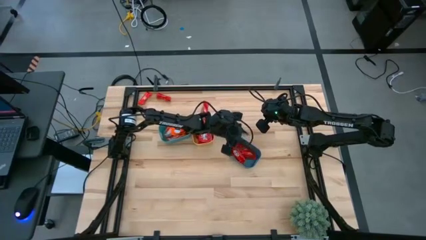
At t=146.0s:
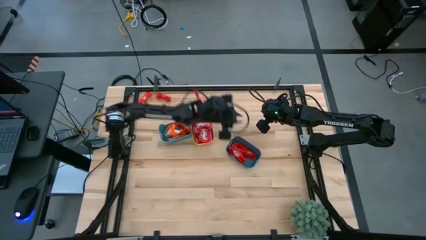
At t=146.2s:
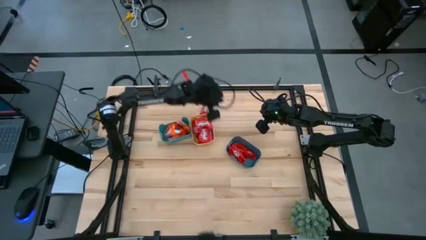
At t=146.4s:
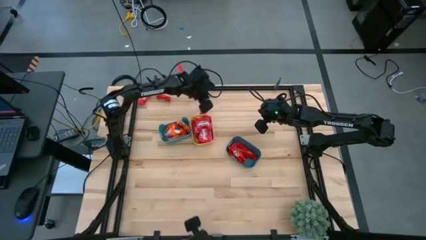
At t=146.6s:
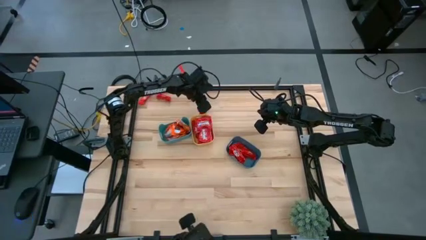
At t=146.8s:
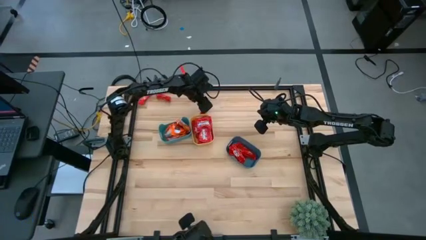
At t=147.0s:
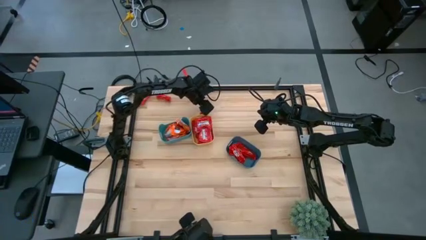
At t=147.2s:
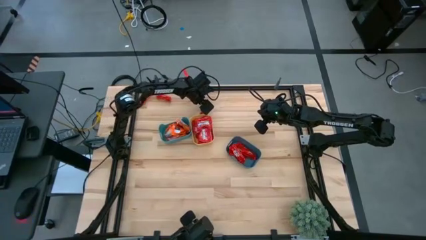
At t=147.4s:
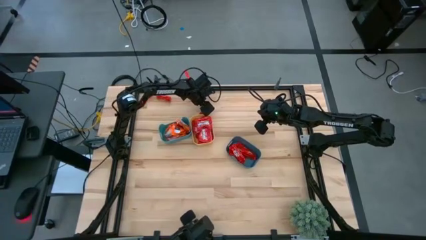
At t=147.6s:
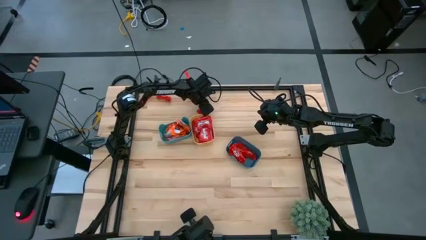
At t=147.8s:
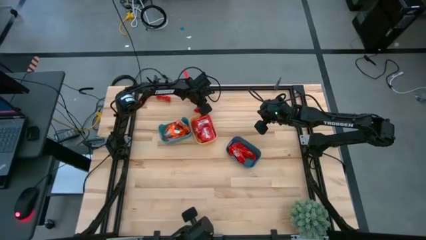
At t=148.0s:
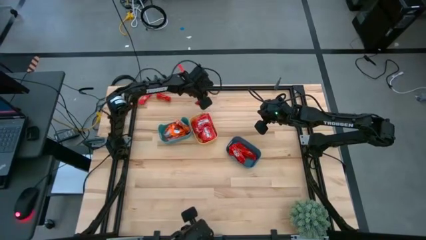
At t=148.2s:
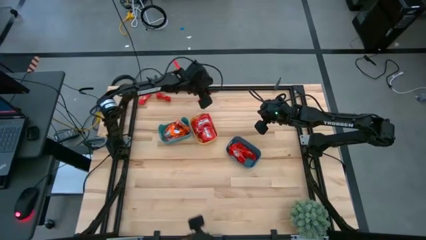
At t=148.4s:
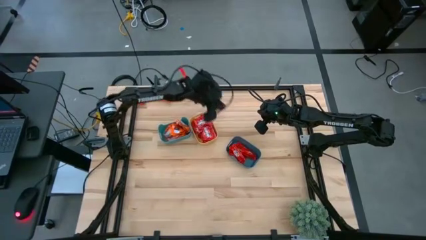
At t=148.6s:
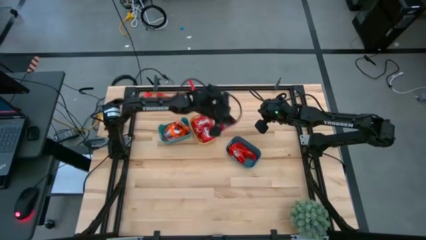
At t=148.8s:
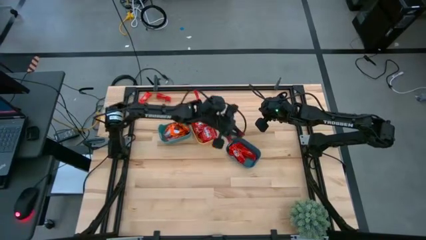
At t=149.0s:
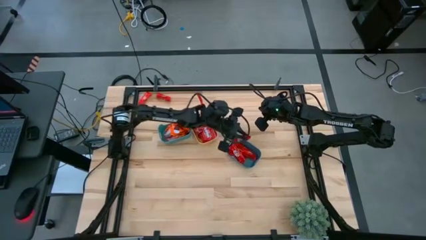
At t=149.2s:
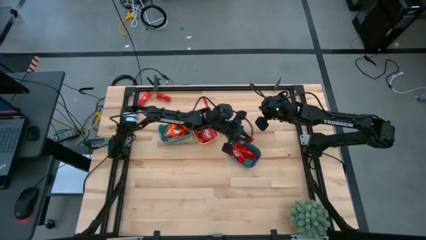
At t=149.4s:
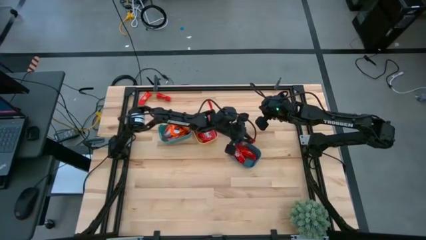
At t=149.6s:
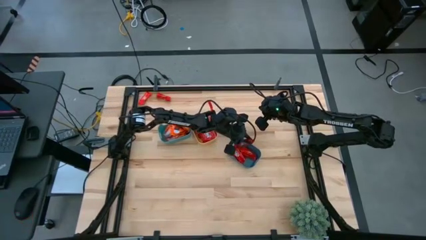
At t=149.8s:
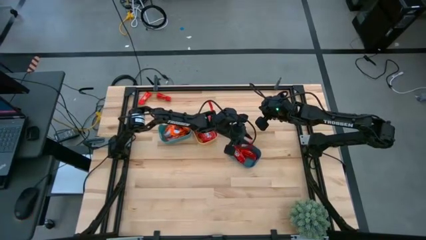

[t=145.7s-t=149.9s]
Task: Sort candy
Put the dark red candy into the blue bin

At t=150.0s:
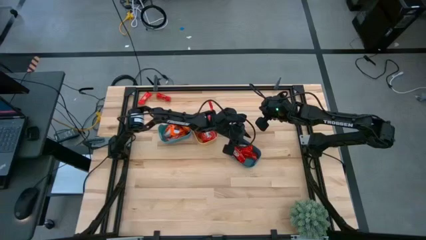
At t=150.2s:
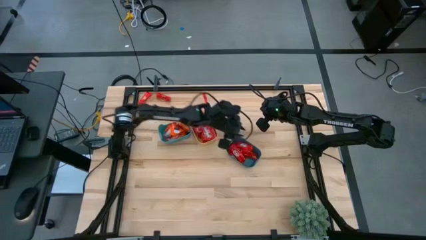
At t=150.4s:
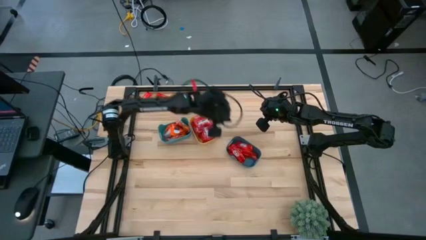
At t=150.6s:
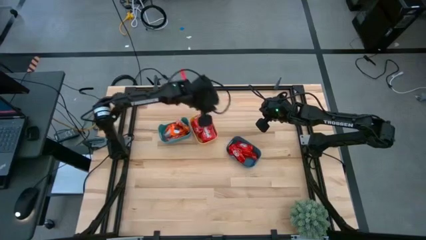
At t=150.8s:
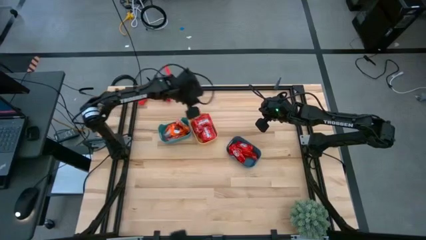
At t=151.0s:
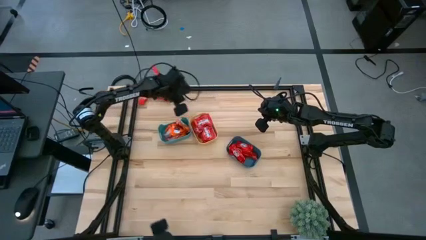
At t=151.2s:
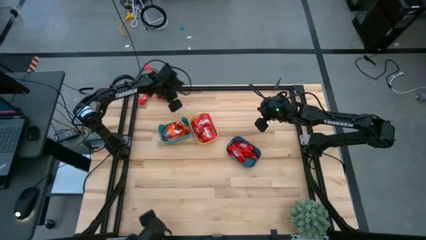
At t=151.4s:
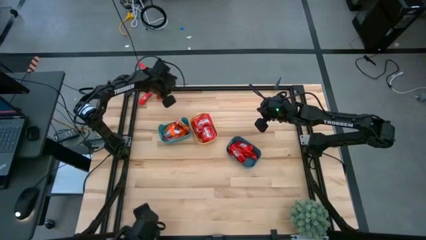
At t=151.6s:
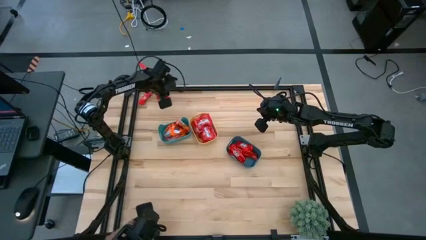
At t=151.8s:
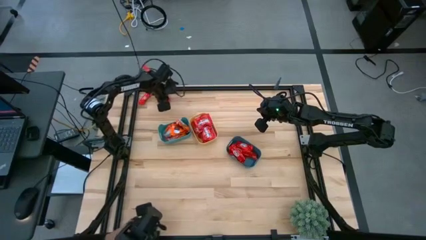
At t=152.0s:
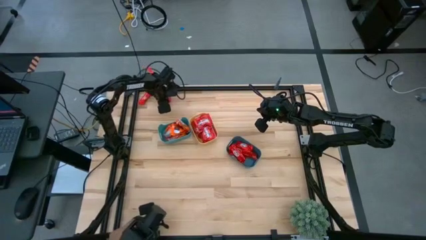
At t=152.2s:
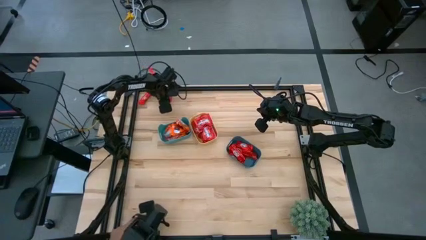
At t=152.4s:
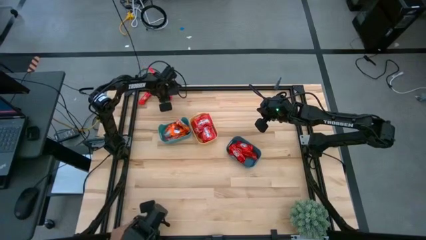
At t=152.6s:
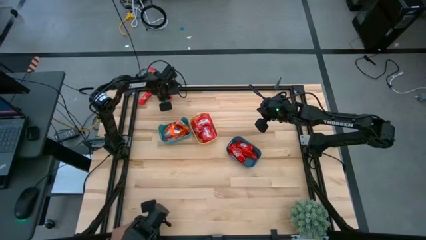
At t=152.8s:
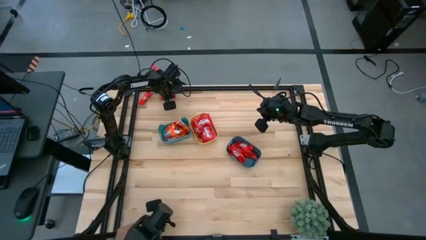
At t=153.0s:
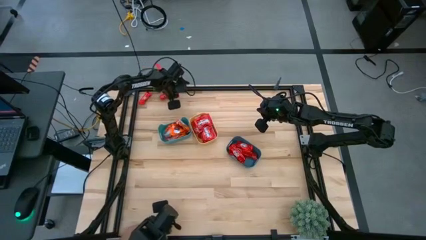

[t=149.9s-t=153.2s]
Put the dark red candy into the blue bin

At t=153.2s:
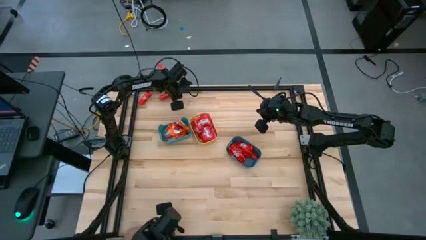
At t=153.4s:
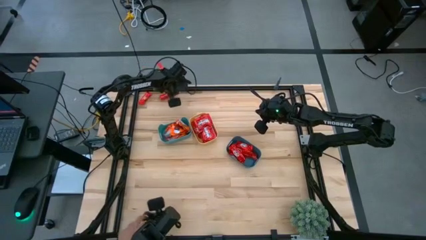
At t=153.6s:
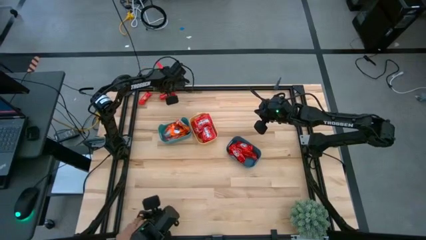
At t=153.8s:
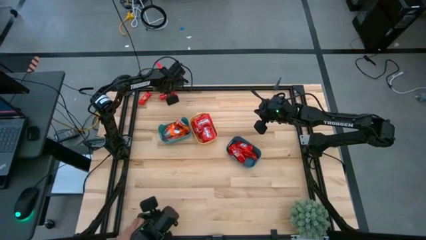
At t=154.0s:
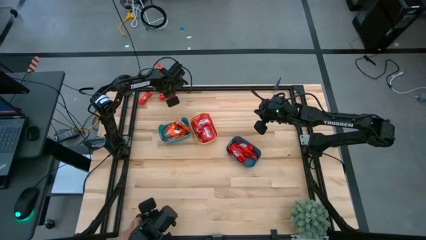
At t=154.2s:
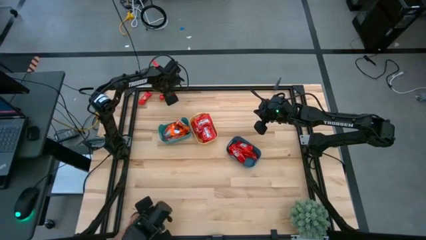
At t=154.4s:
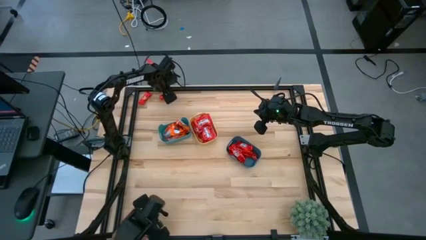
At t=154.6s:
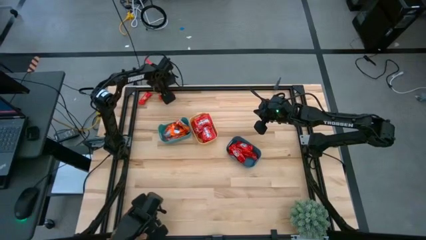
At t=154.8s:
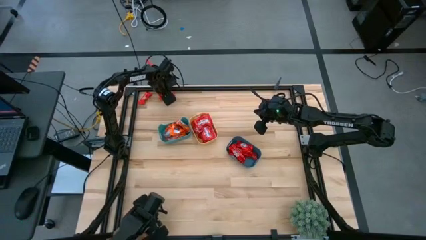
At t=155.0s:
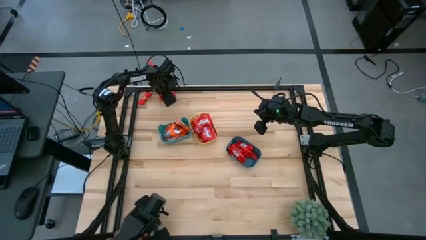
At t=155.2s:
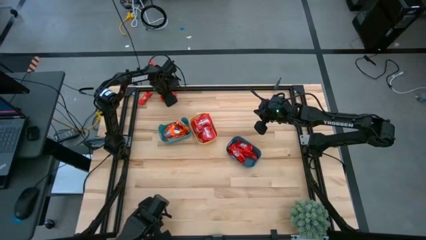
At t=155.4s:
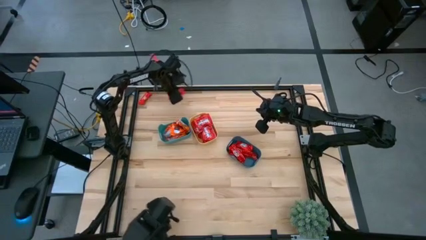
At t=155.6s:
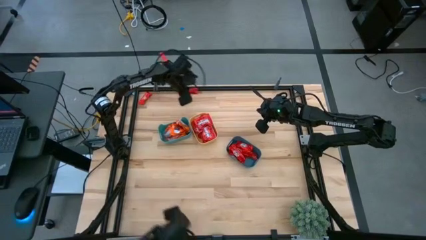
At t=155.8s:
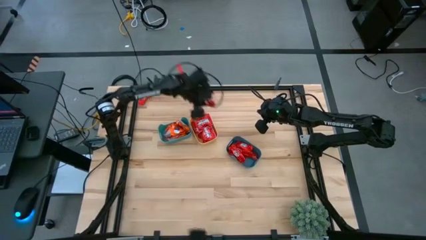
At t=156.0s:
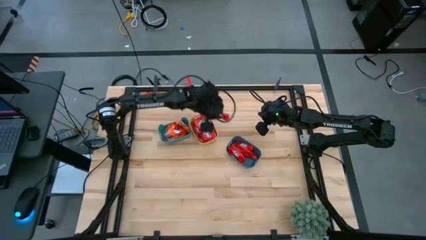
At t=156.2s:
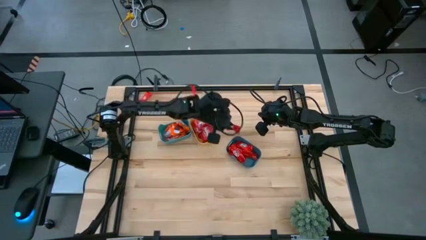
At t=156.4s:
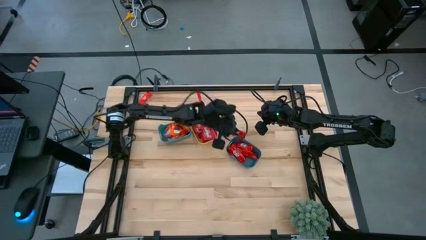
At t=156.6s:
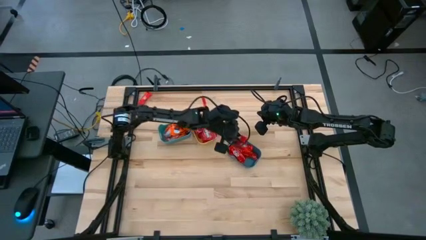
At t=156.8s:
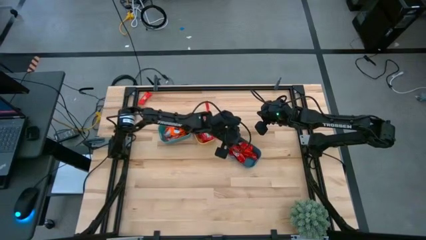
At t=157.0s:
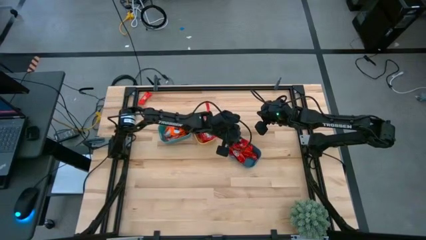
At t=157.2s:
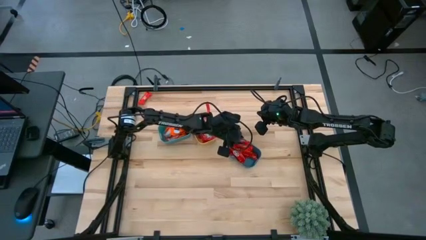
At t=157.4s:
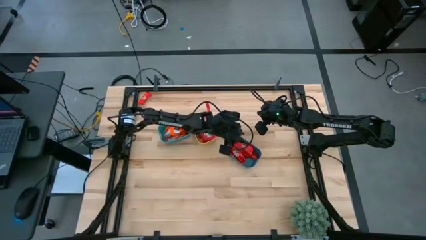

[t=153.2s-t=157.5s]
Put the dark red candy into the blue bin

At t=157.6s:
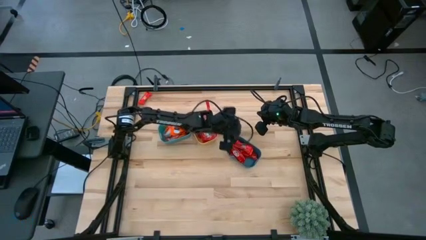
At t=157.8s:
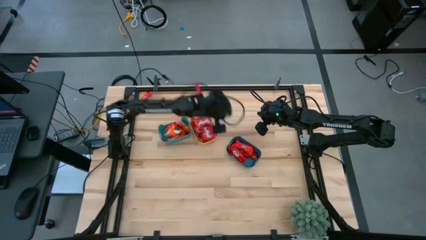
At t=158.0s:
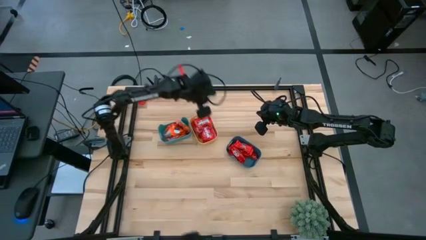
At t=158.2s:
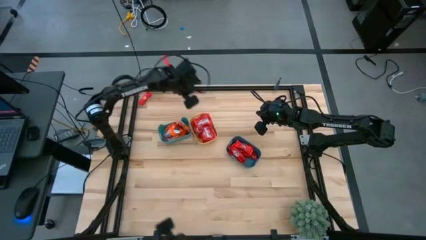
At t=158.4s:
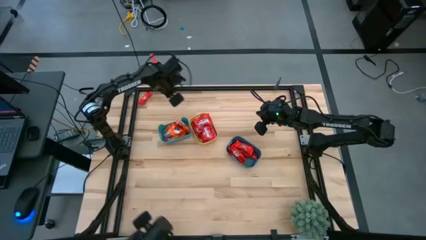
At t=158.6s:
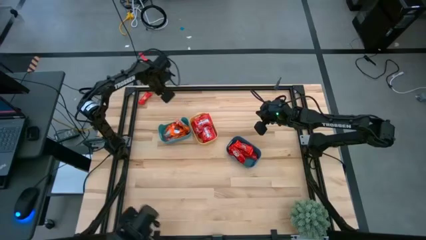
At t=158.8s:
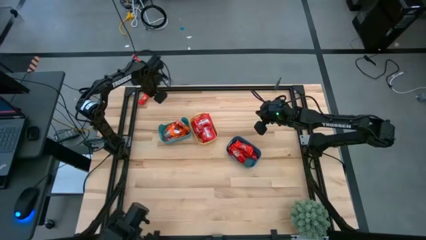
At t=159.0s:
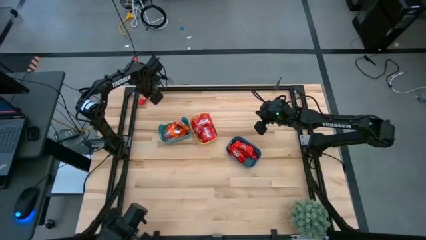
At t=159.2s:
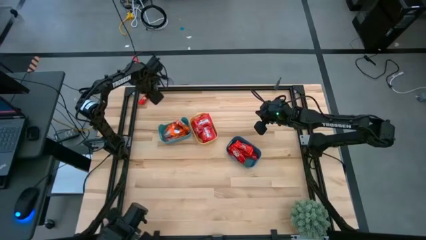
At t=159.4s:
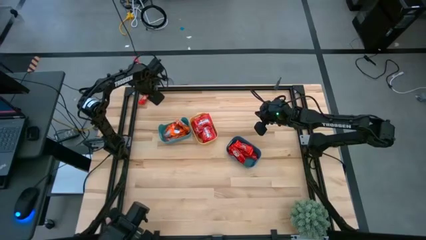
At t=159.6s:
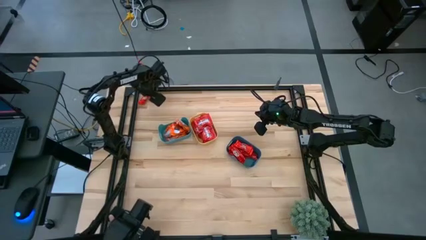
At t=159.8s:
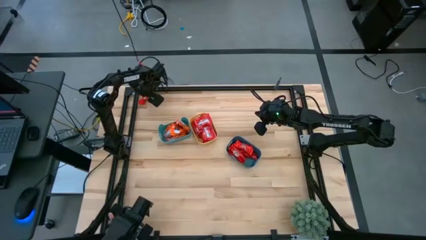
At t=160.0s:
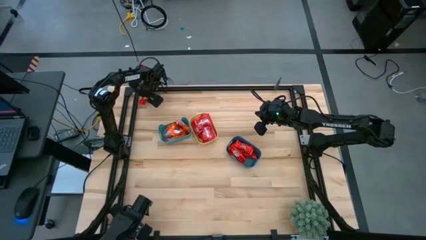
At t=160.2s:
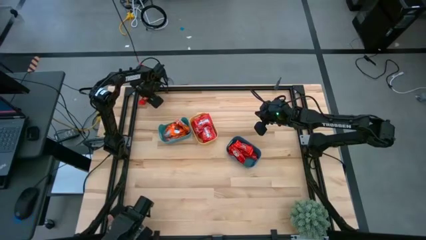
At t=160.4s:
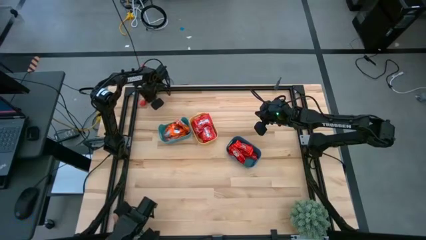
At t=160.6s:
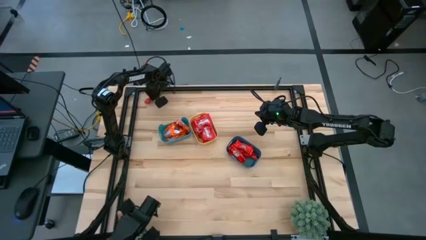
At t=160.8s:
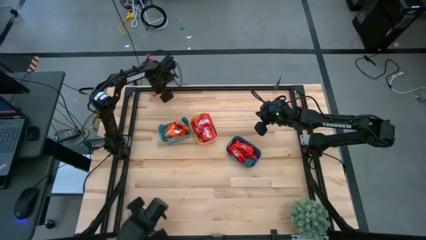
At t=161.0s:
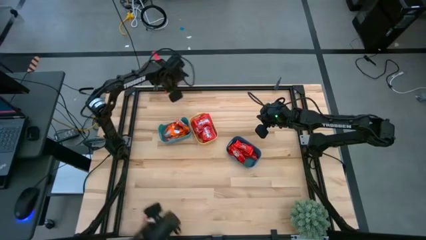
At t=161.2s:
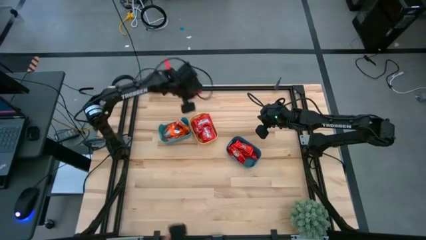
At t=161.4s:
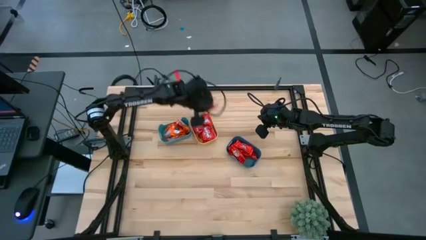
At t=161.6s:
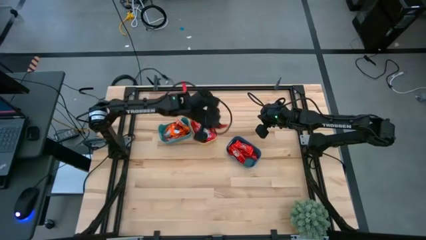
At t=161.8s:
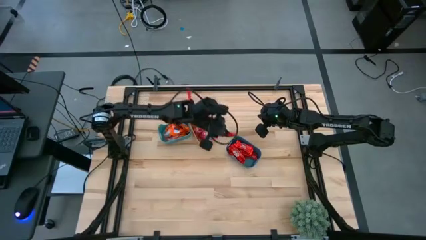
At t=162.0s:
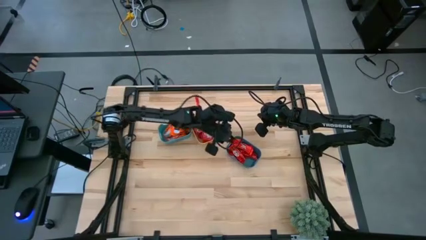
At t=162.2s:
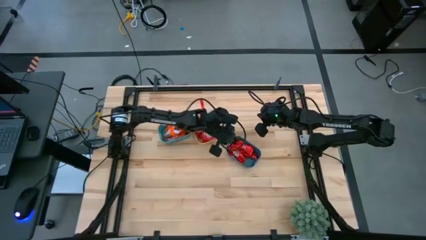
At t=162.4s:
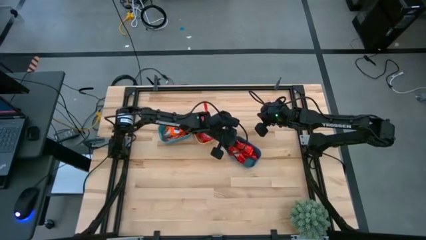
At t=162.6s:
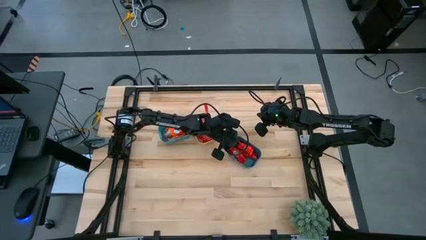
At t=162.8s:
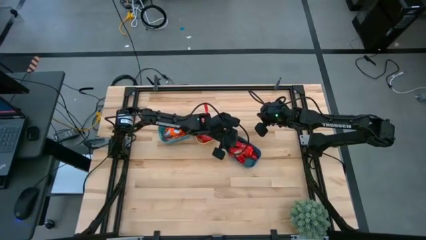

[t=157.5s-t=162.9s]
Put the dark red candy into the blue bin
